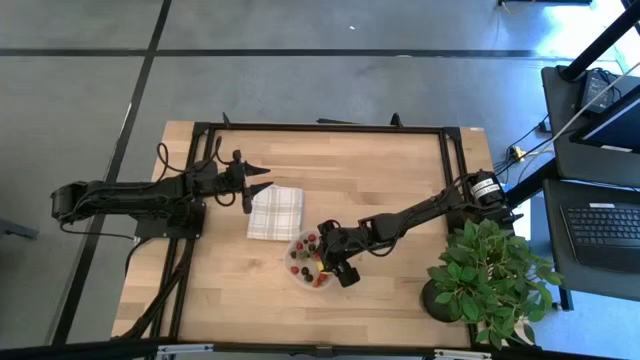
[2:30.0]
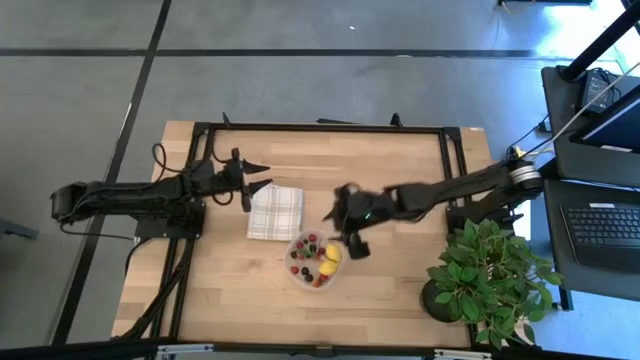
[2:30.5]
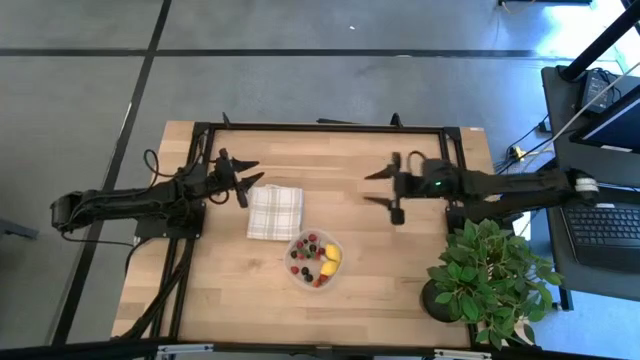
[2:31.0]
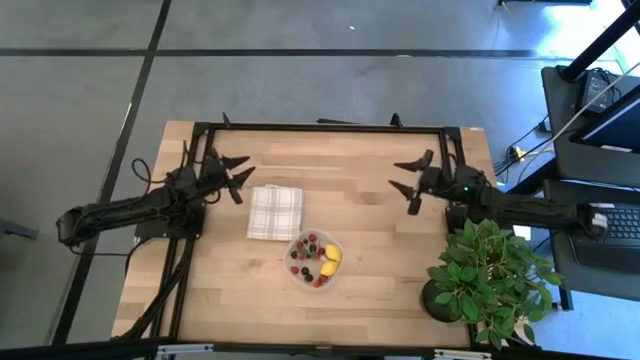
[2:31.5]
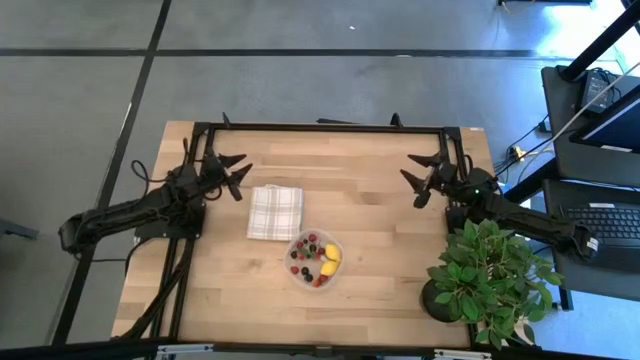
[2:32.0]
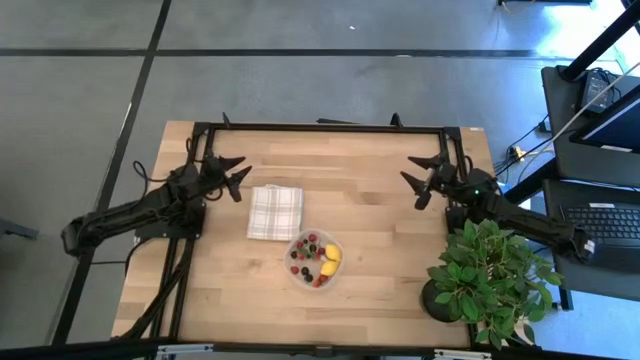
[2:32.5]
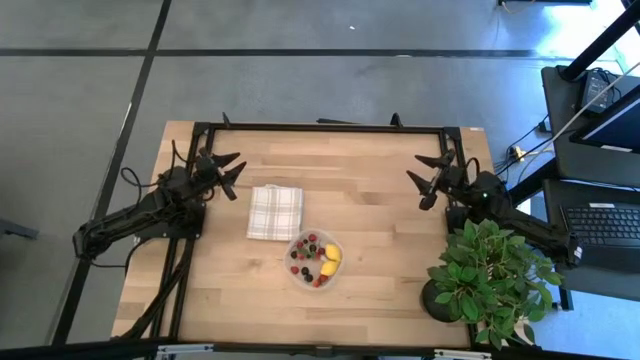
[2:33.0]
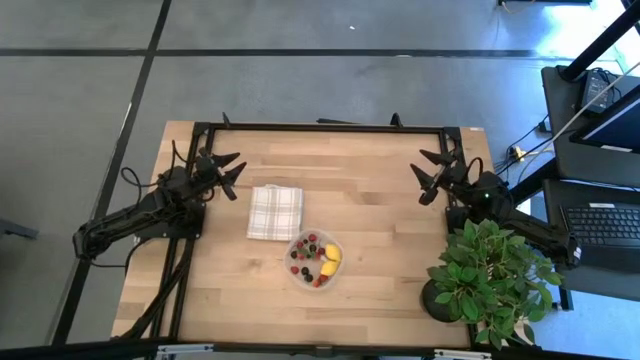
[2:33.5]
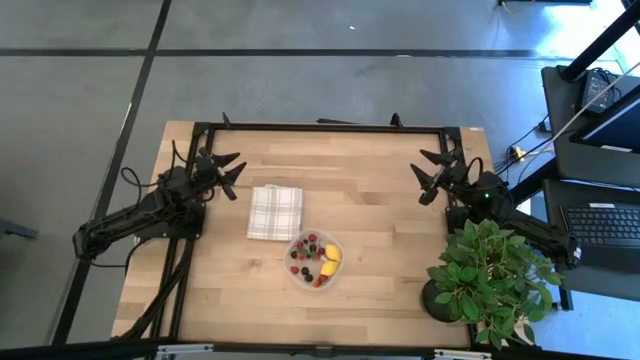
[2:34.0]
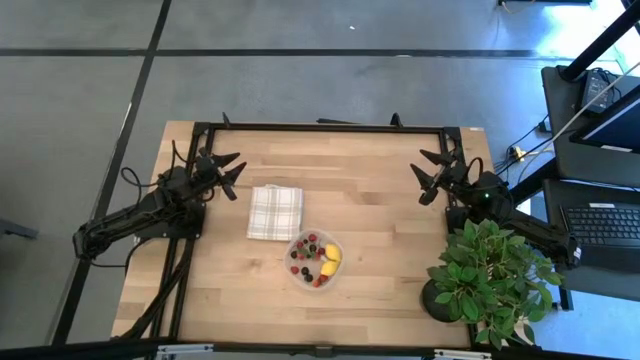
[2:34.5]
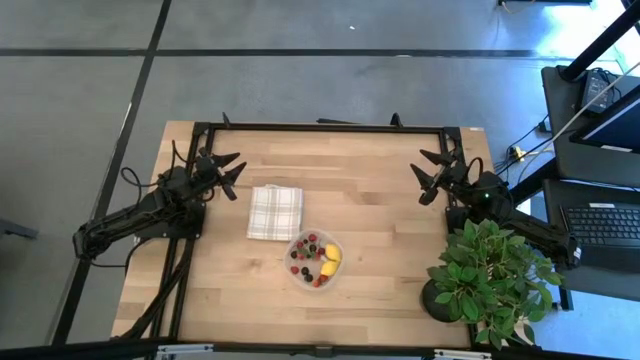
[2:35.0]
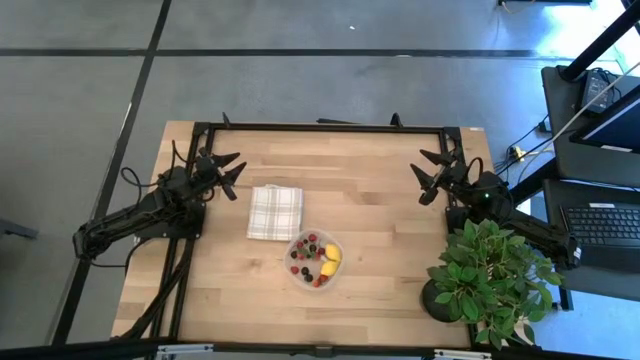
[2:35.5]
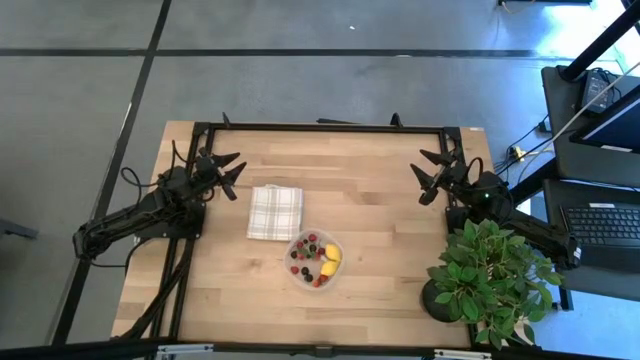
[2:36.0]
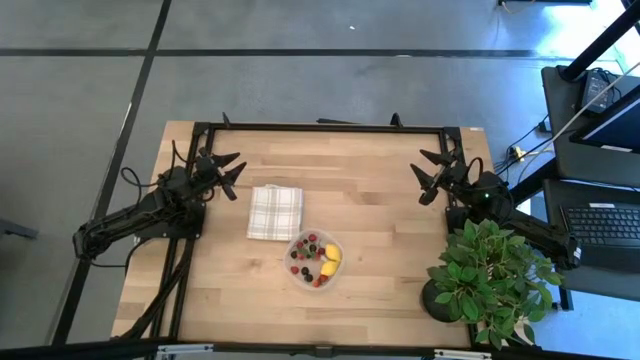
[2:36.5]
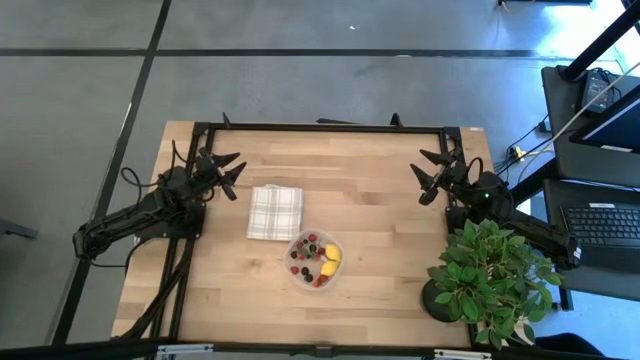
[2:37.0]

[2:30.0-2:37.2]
Task: Pick and placing Produce into tupperware
Return to Home Position

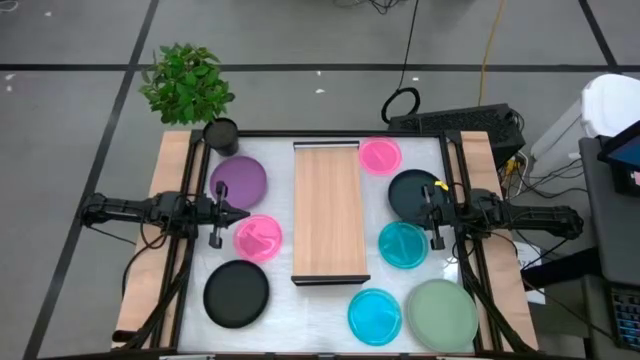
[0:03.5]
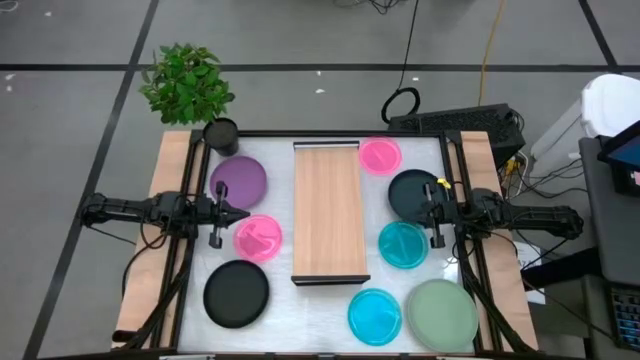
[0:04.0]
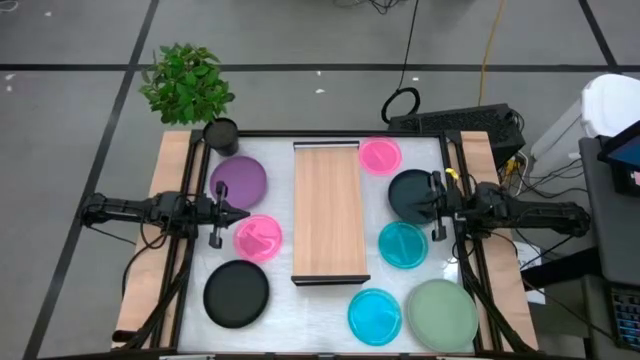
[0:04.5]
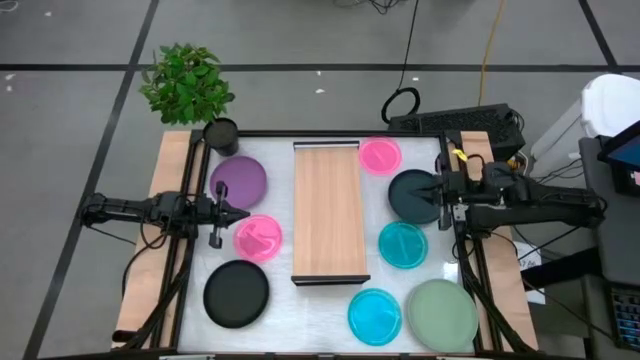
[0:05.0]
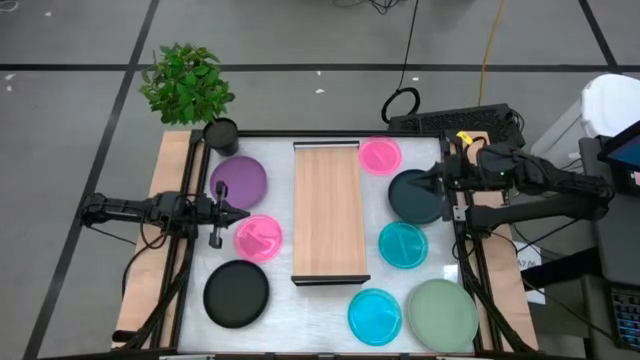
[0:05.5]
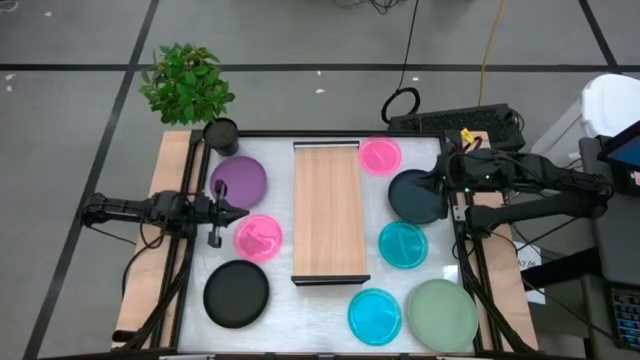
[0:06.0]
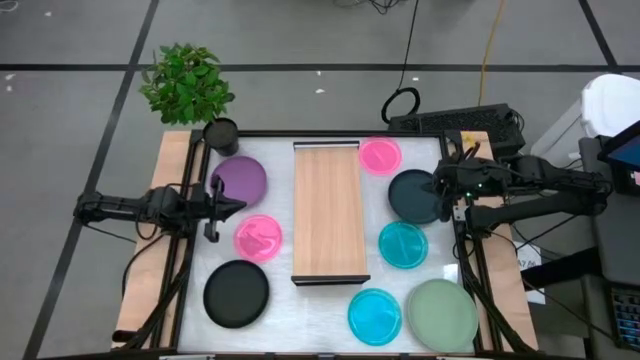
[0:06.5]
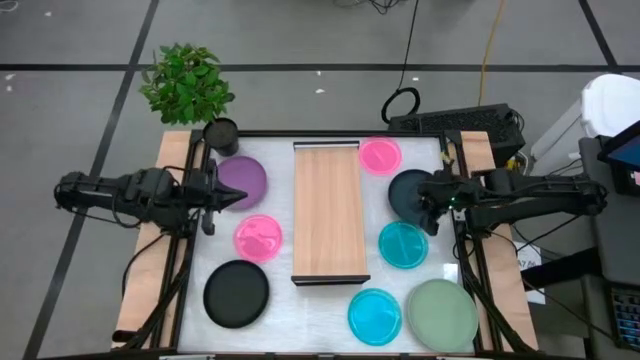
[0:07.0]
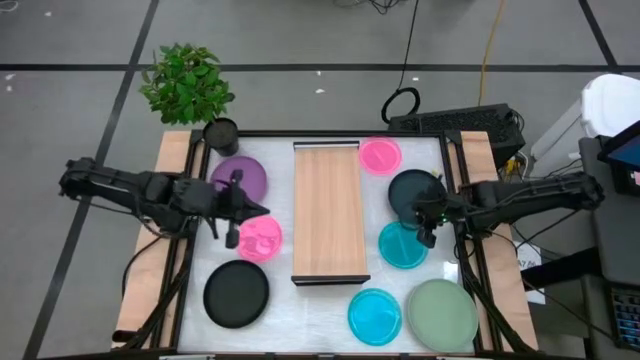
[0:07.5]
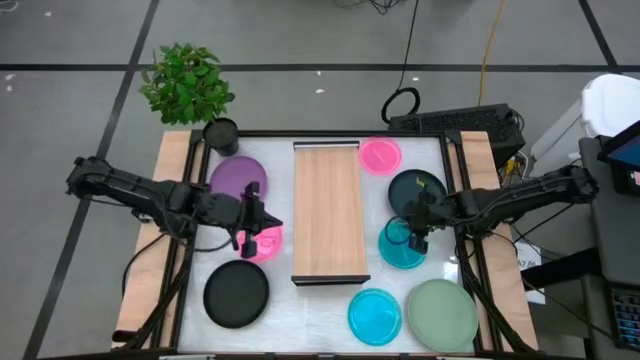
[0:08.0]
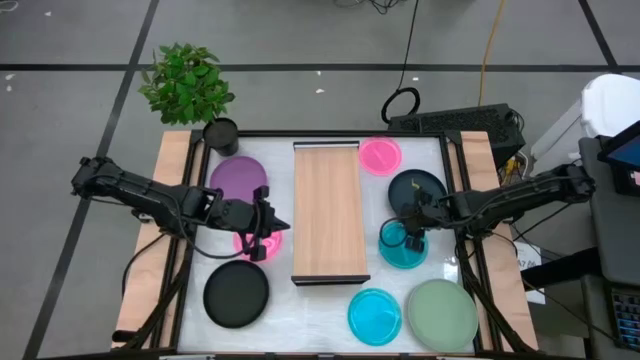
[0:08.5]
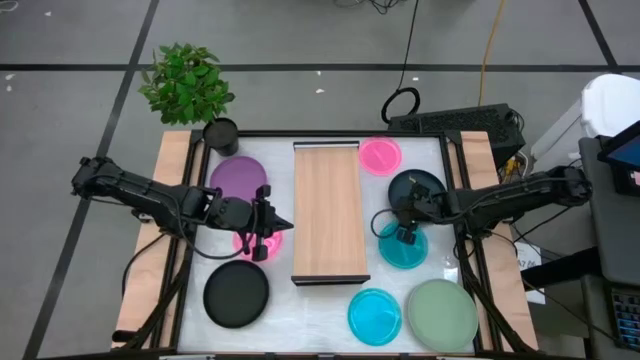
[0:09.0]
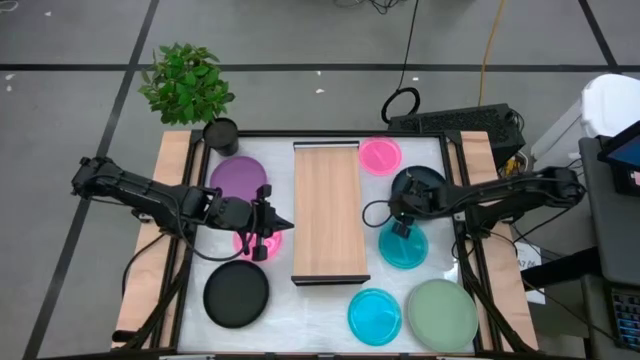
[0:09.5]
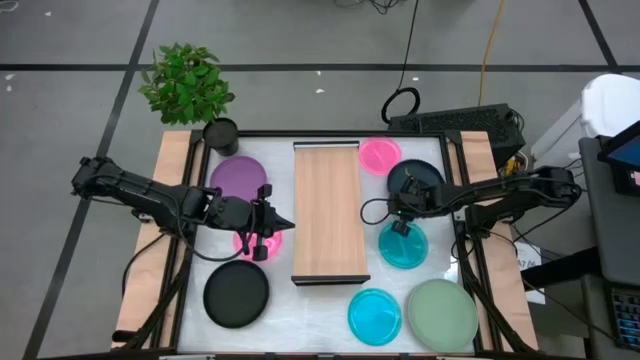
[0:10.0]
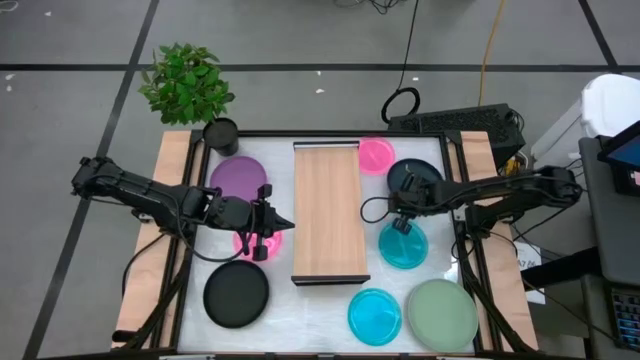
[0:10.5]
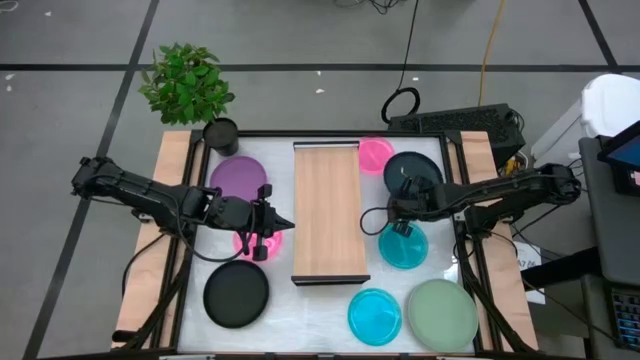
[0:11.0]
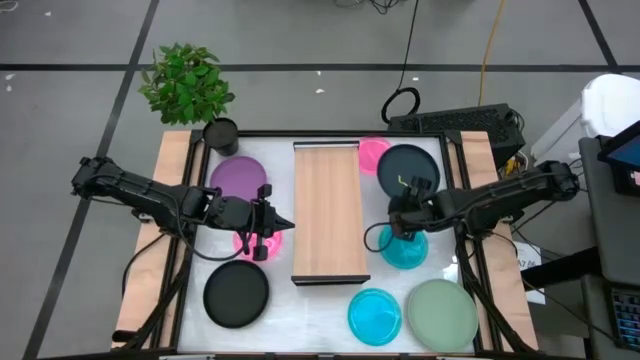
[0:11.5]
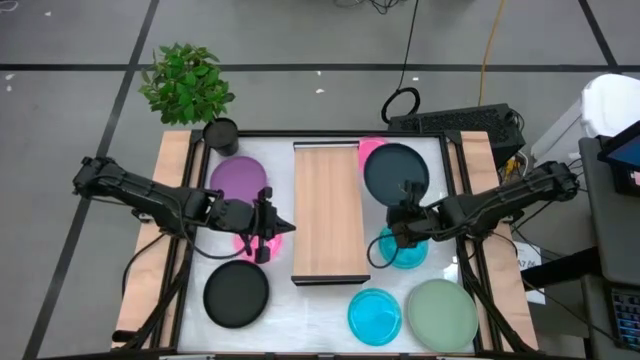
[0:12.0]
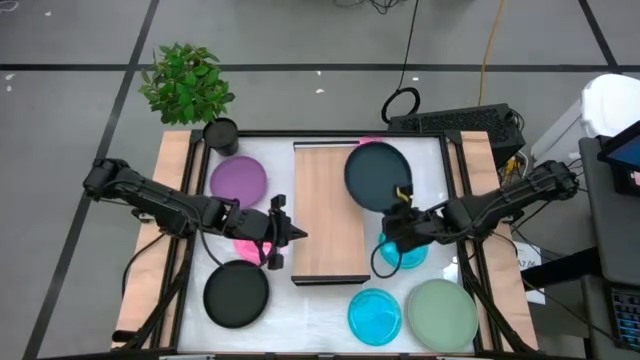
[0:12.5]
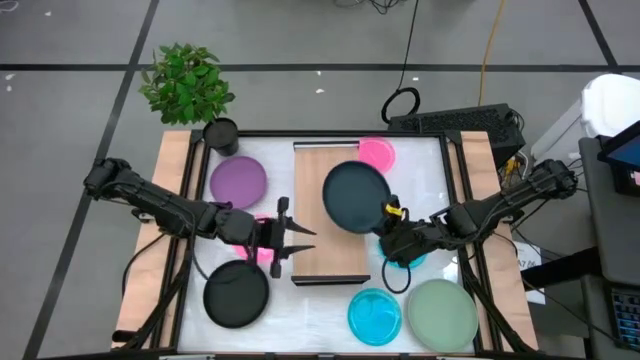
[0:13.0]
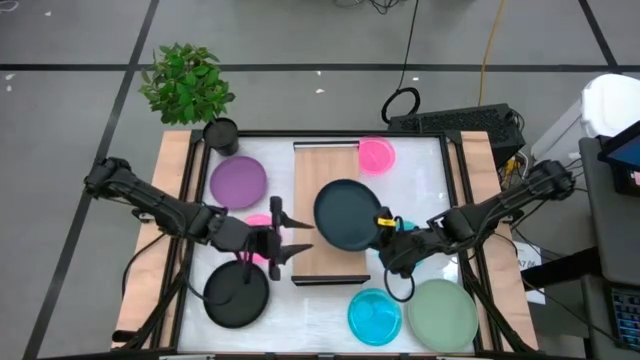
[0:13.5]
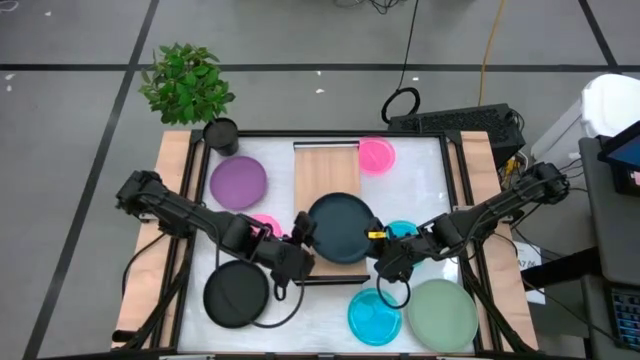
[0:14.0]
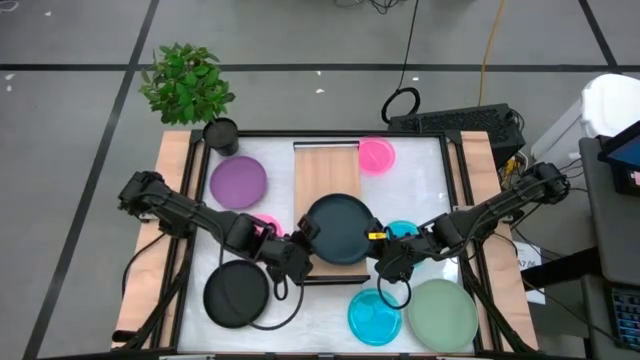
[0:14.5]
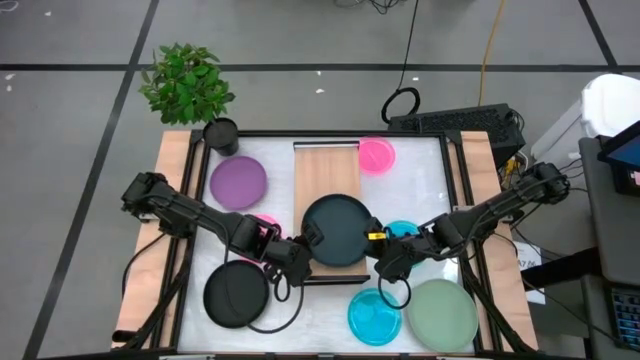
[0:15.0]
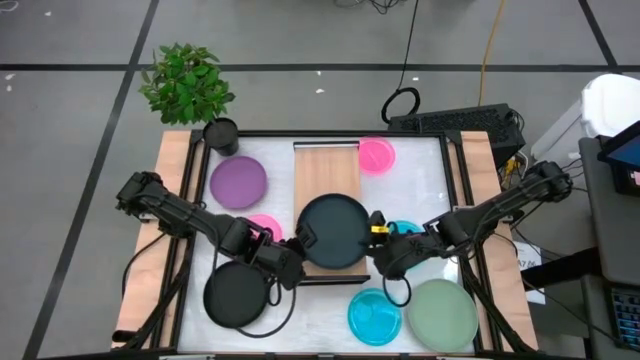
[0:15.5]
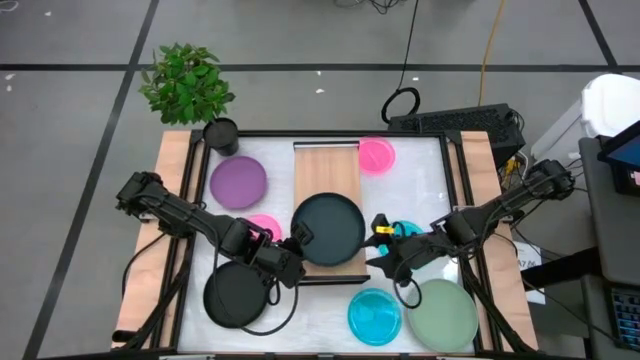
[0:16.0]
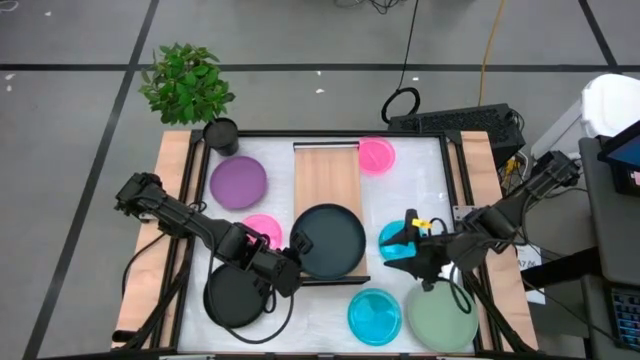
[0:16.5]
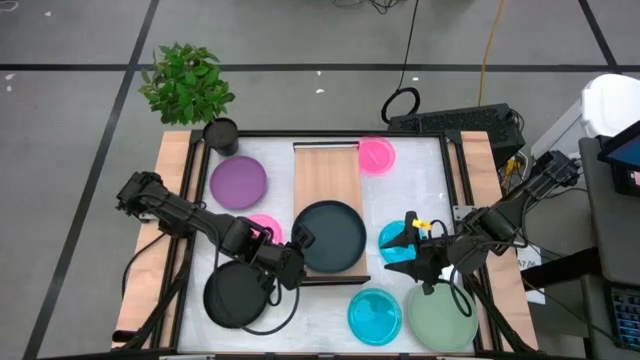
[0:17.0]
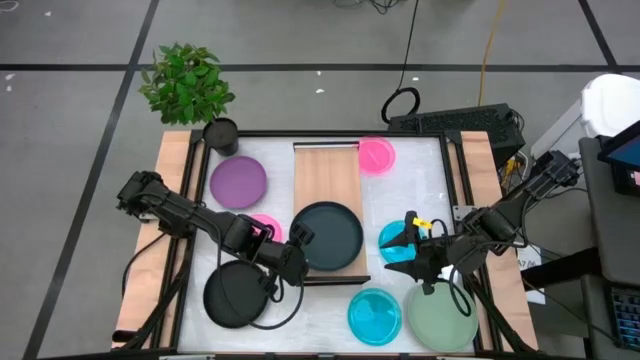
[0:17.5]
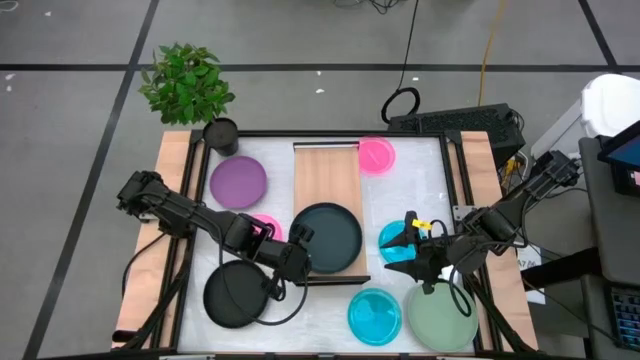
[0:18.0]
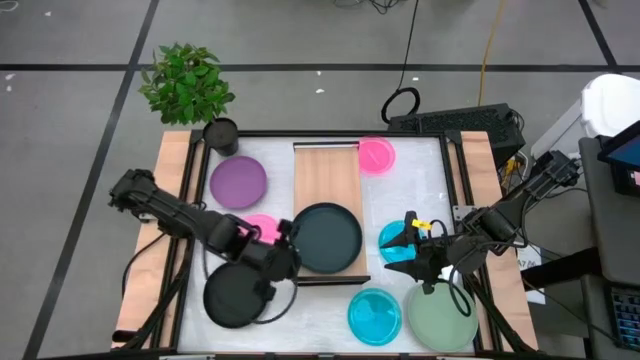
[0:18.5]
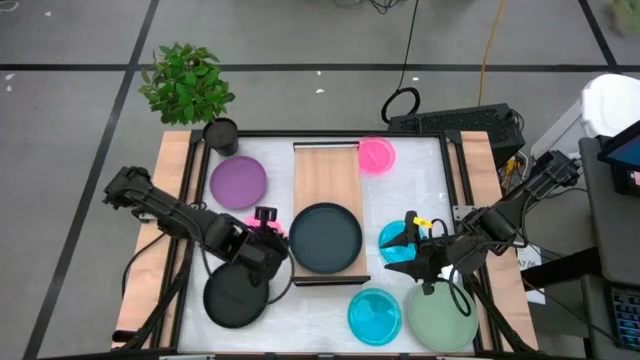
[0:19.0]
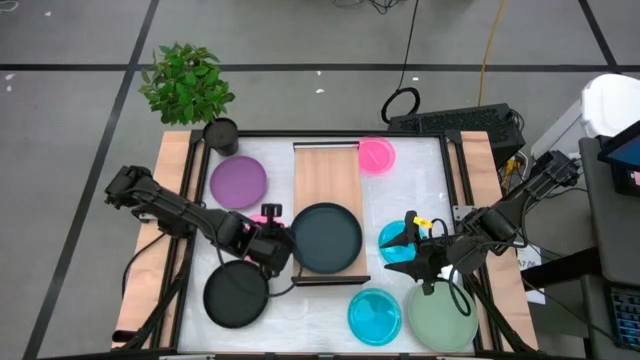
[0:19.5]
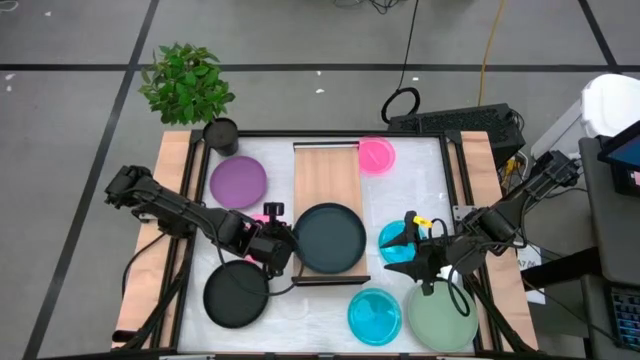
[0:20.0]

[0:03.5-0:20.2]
Task: Place and stack plates onto a shelf
Put the dark green plate on the shelf
